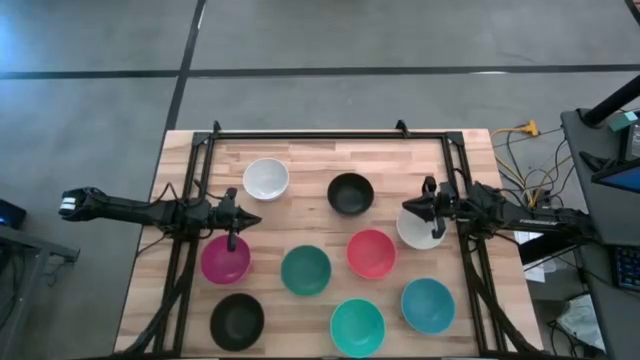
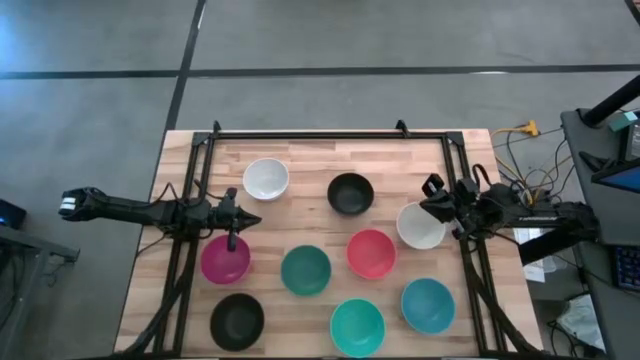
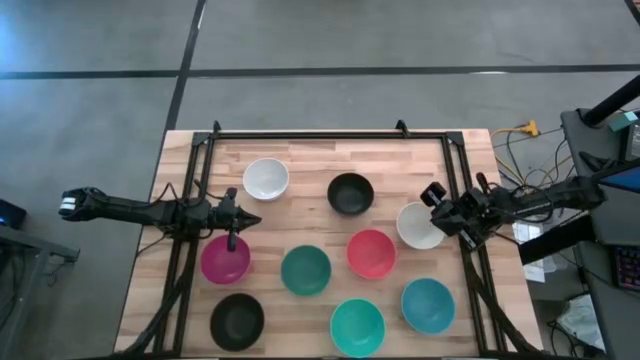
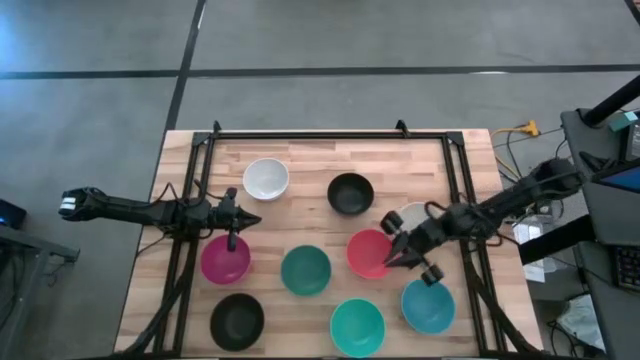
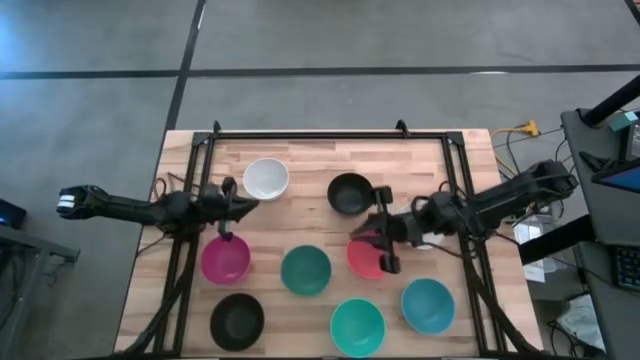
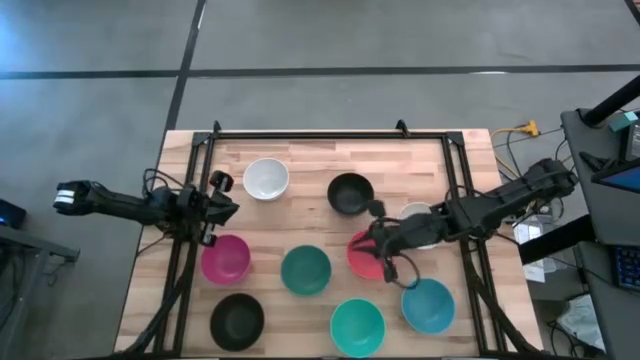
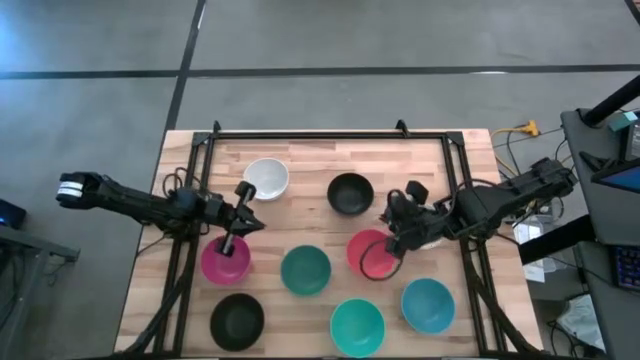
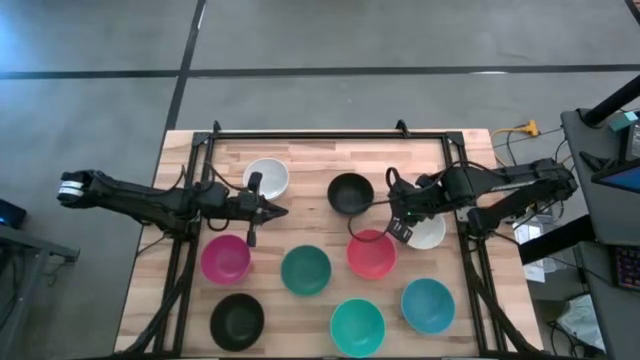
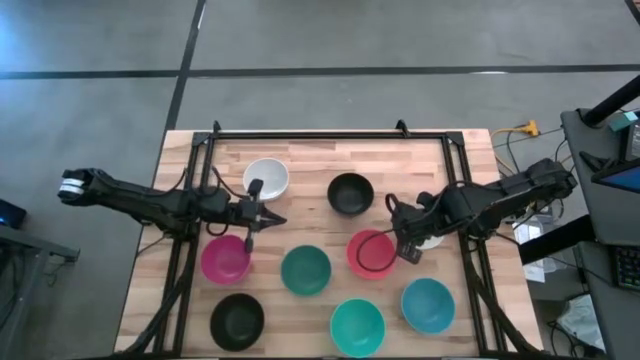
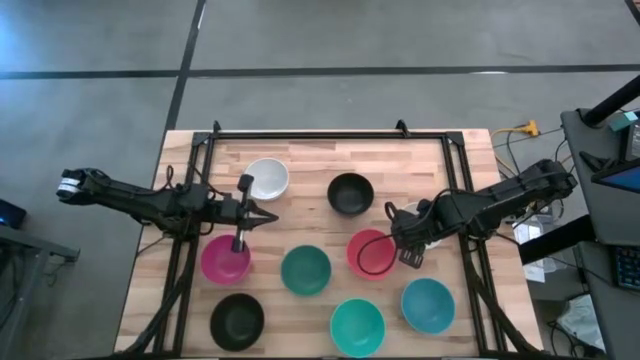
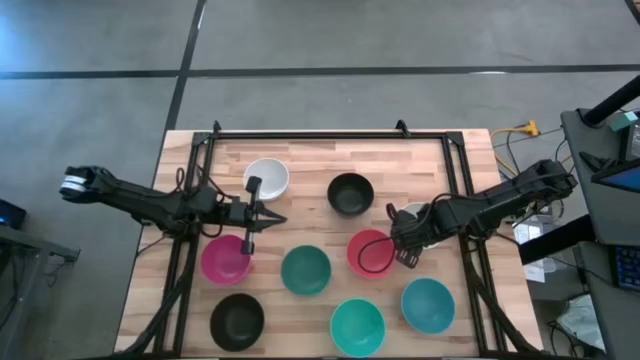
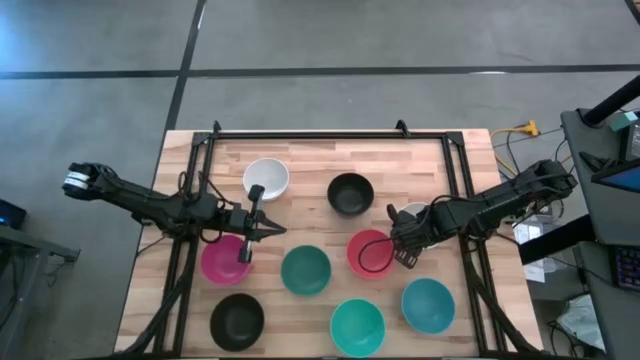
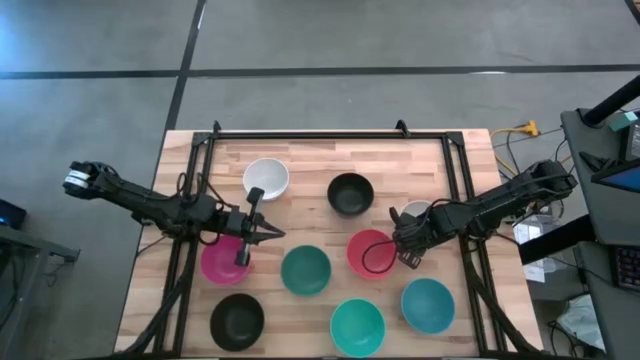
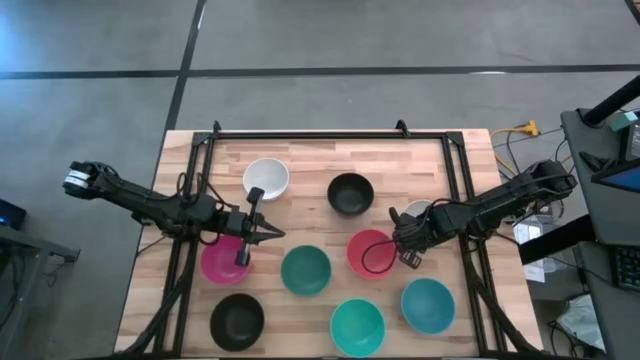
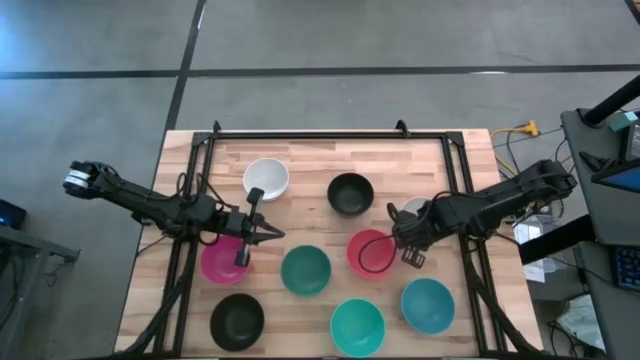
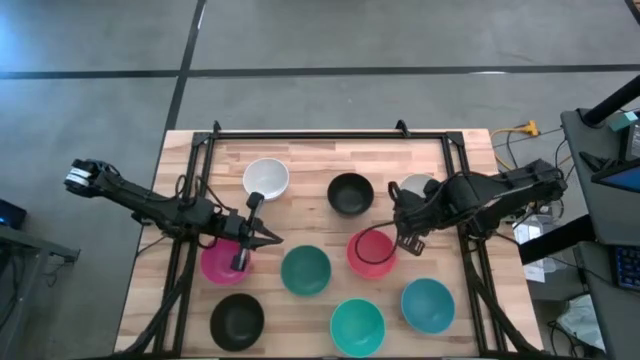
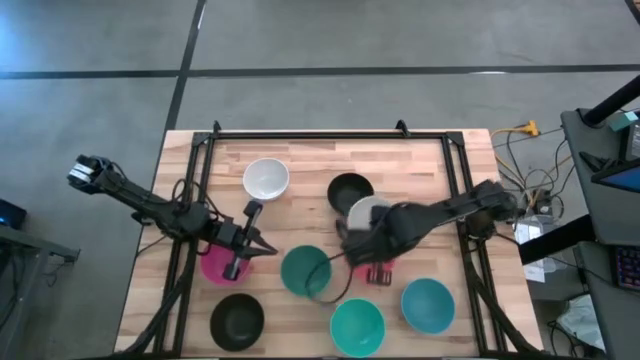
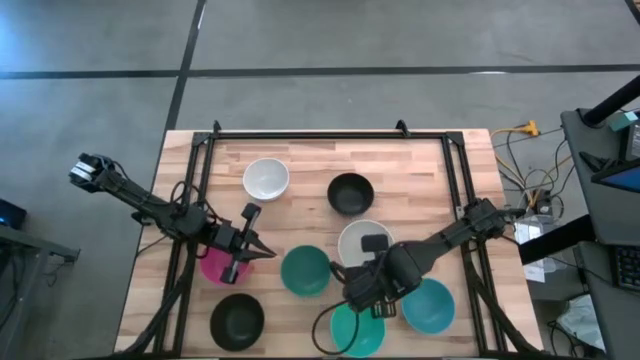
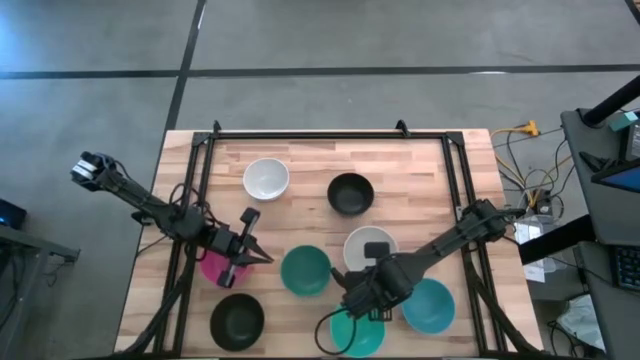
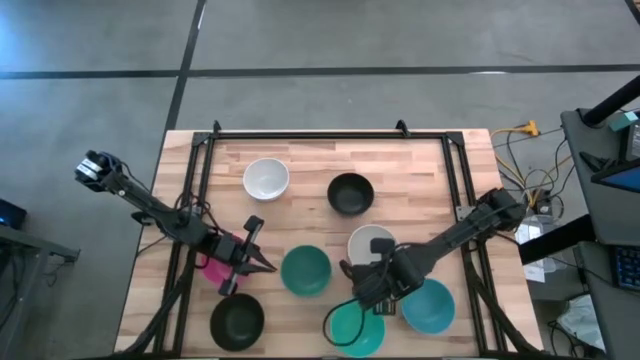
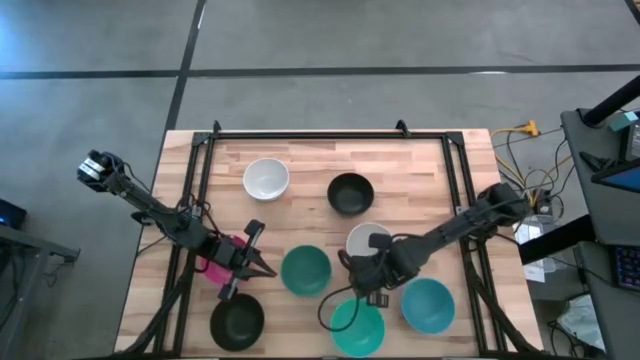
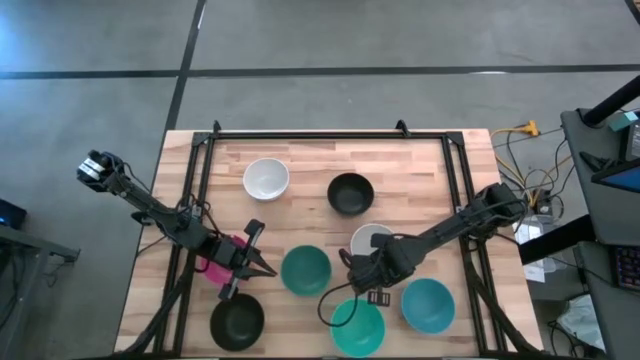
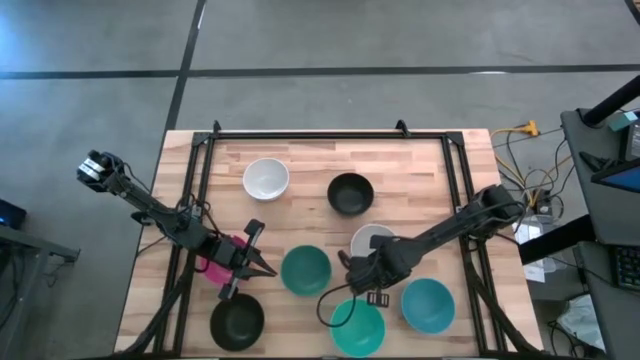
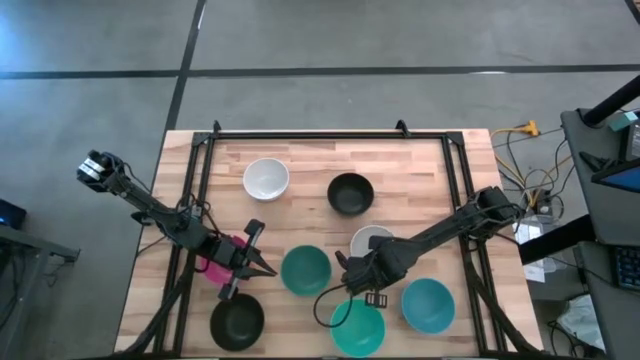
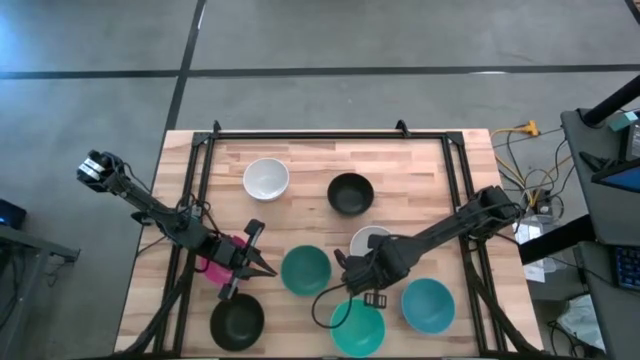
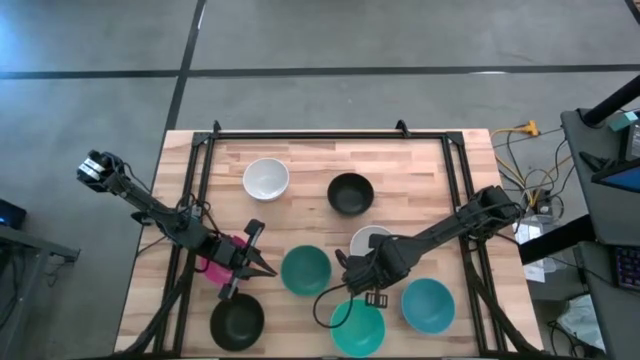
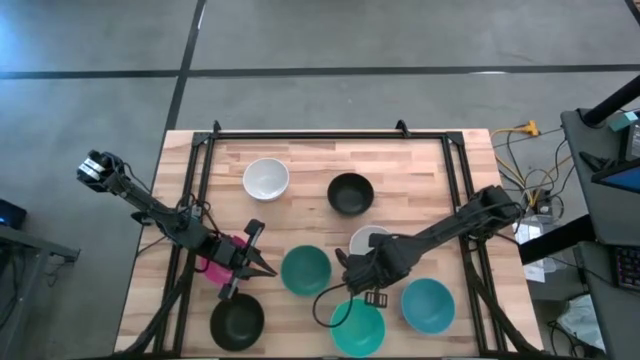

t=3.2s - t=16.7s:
Task: Nest bowls inside each other
Stack the right white bowl on top of the orange bowl

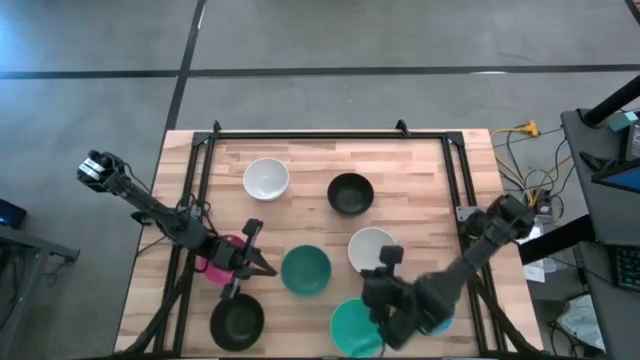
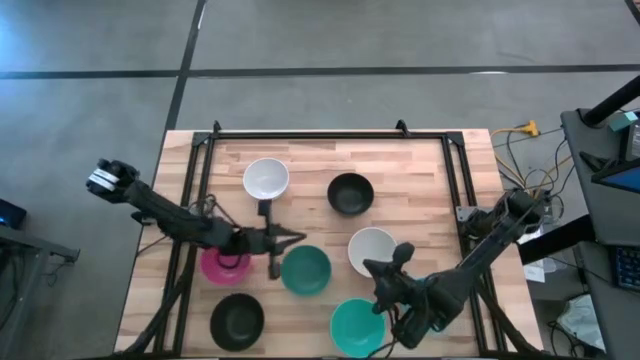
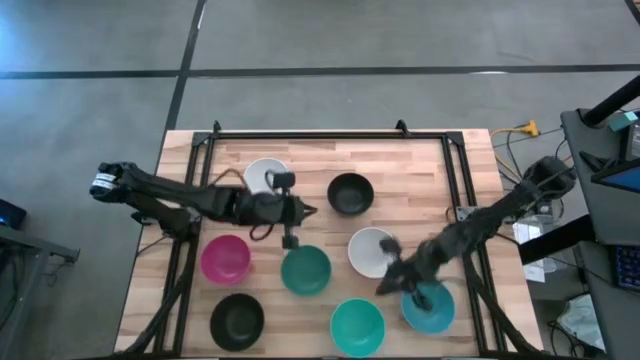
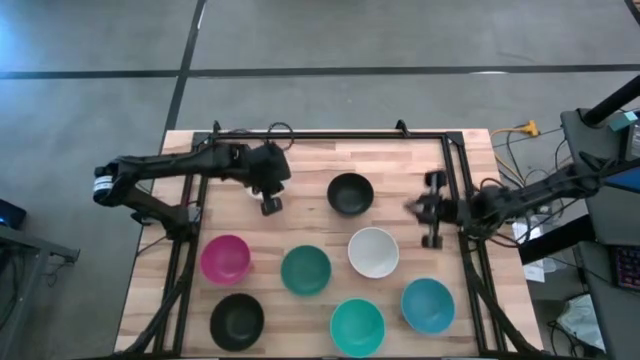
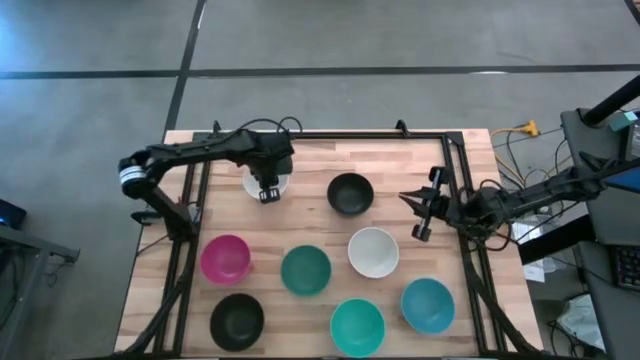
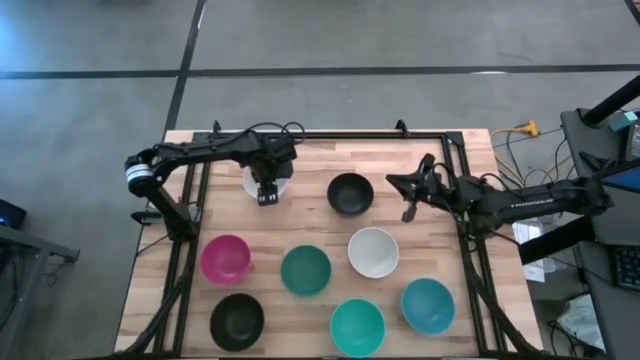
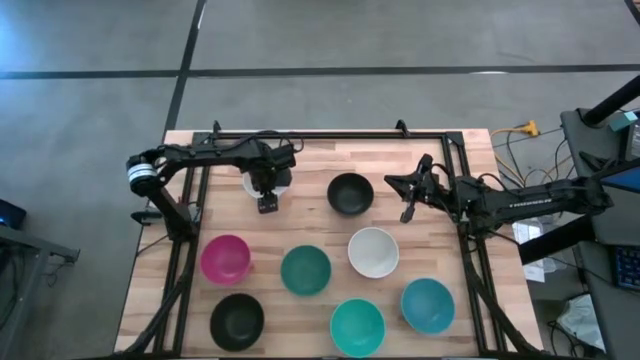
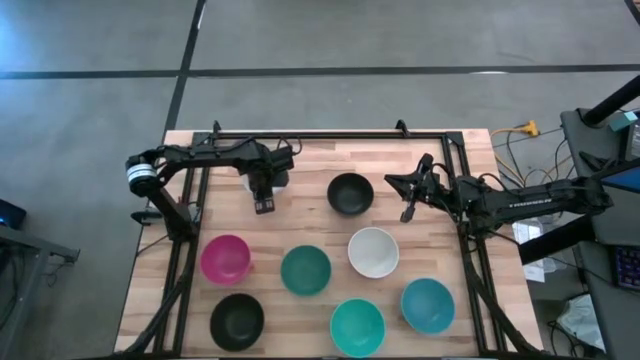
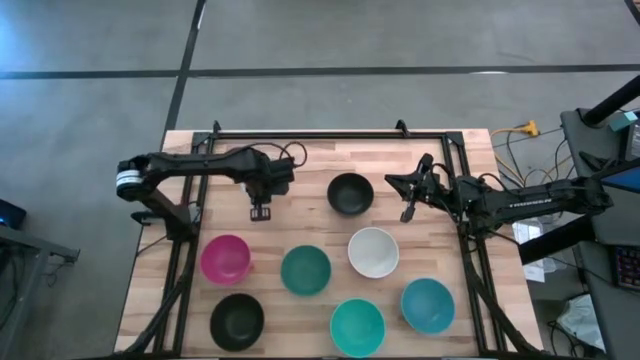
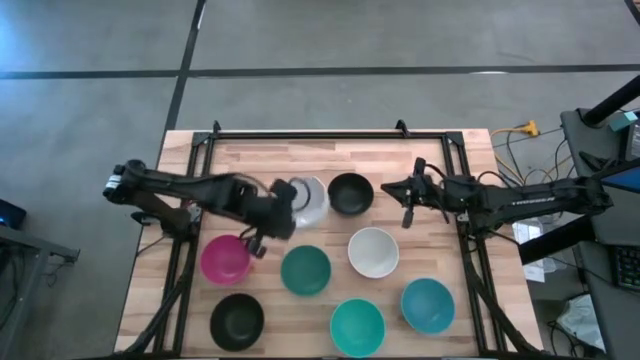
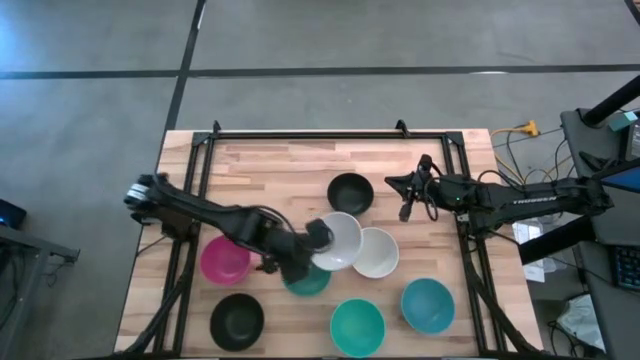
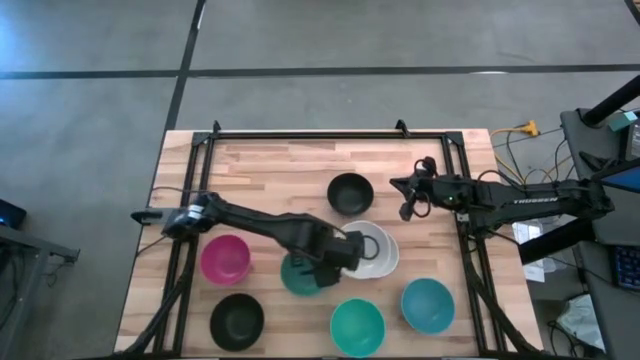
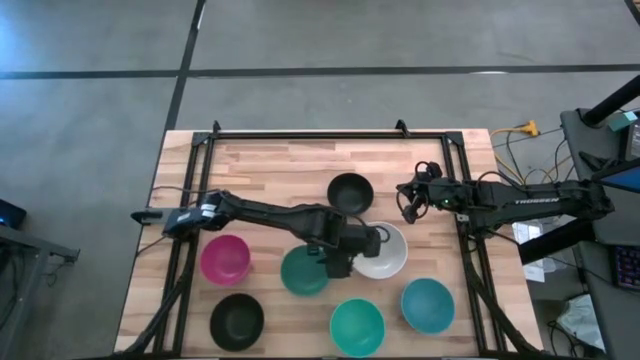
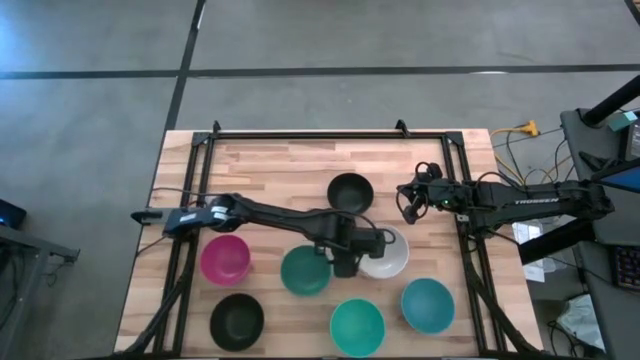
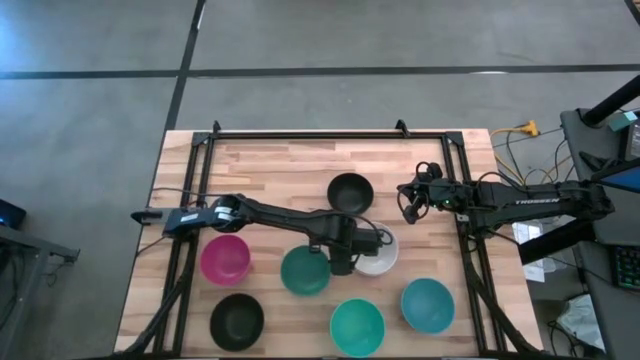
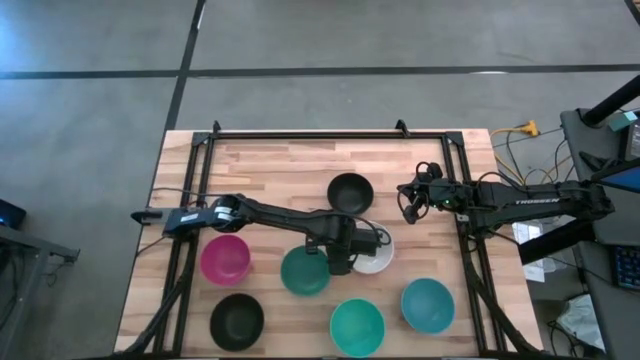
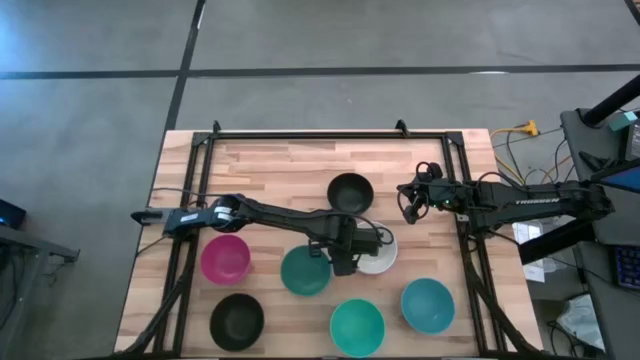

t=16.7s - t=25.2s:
Stack the left white bowl on top of the right white bowl
